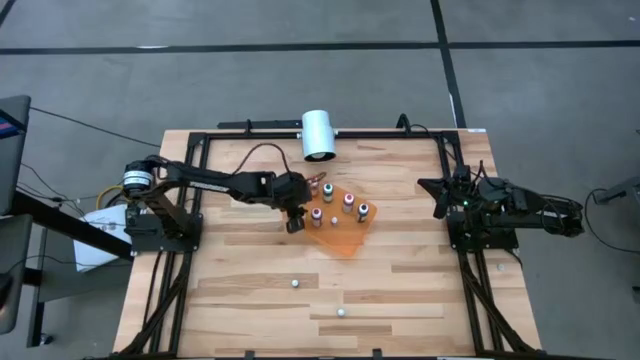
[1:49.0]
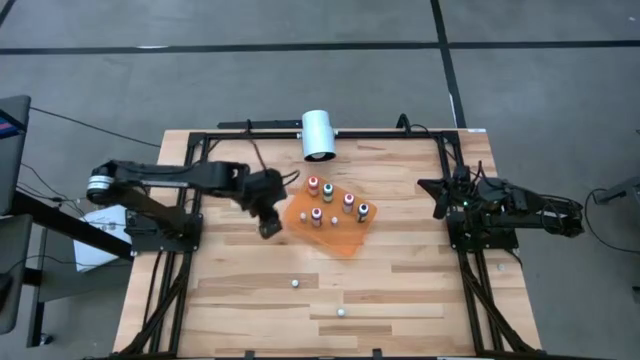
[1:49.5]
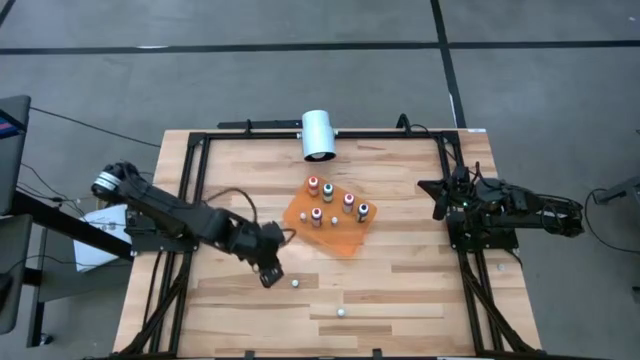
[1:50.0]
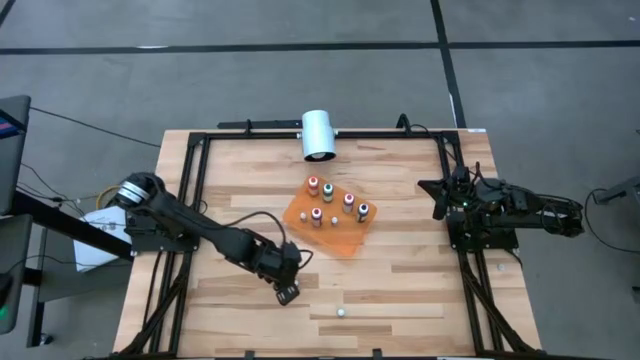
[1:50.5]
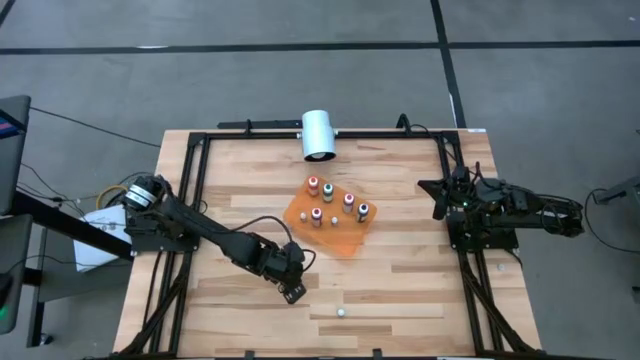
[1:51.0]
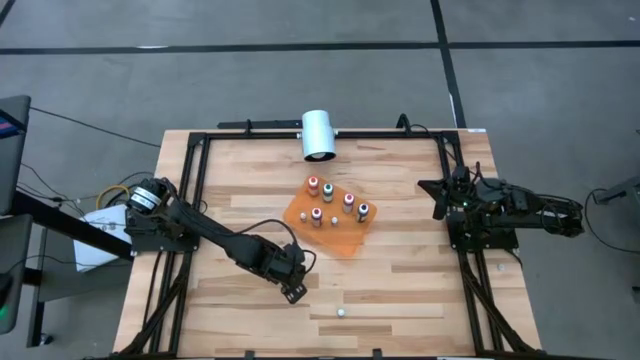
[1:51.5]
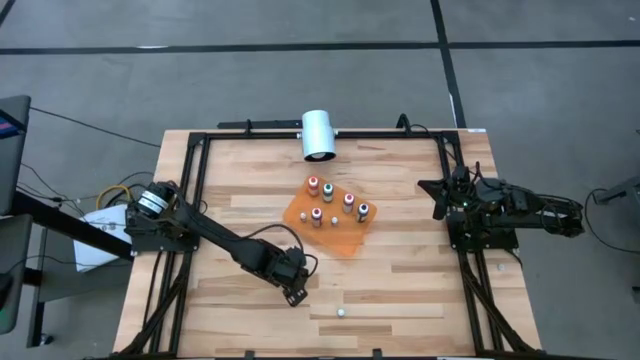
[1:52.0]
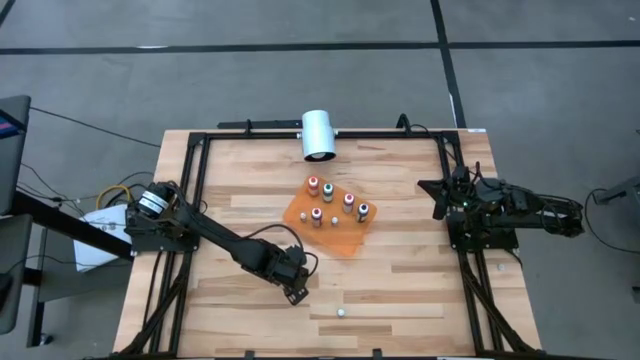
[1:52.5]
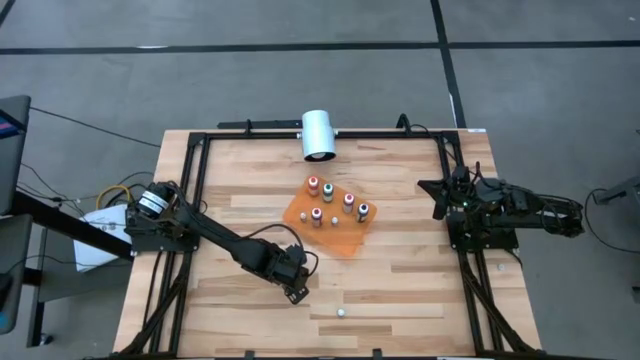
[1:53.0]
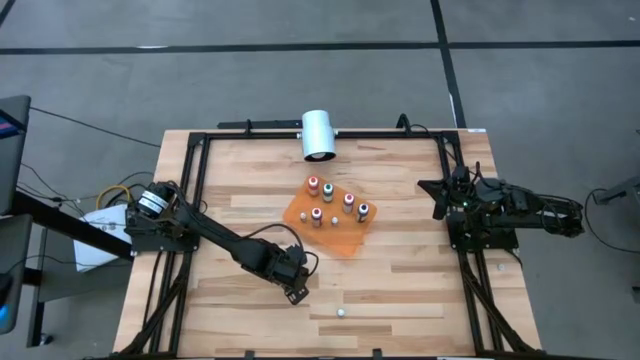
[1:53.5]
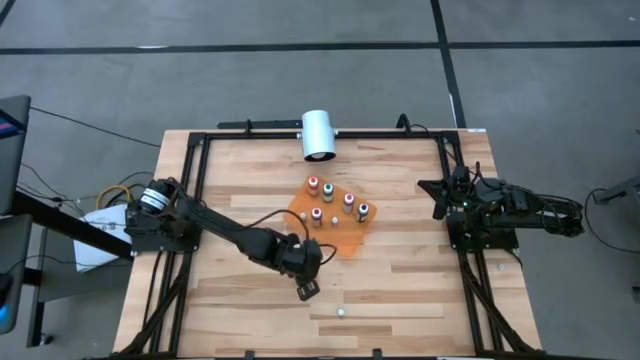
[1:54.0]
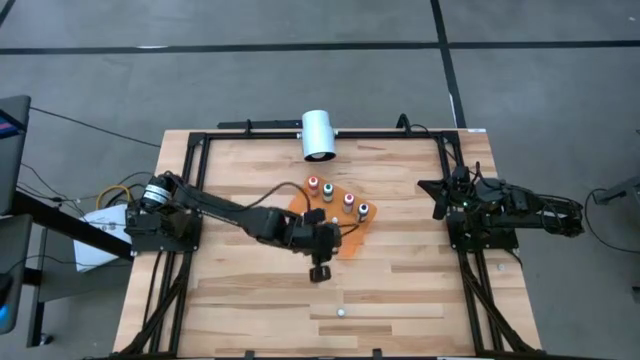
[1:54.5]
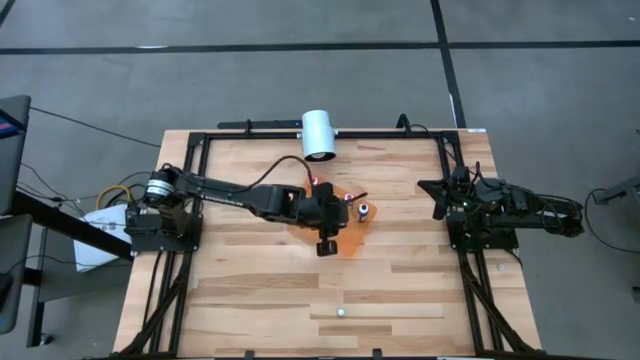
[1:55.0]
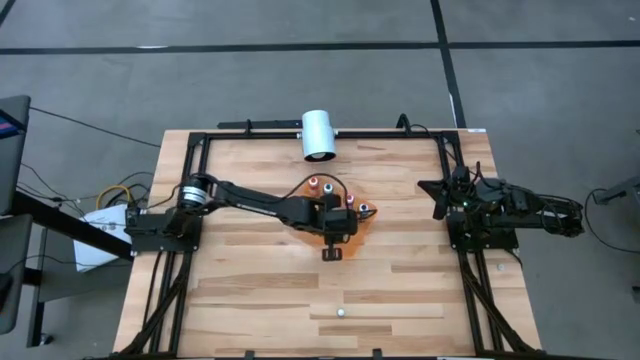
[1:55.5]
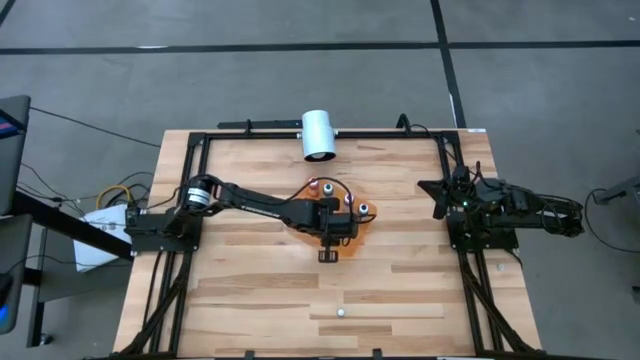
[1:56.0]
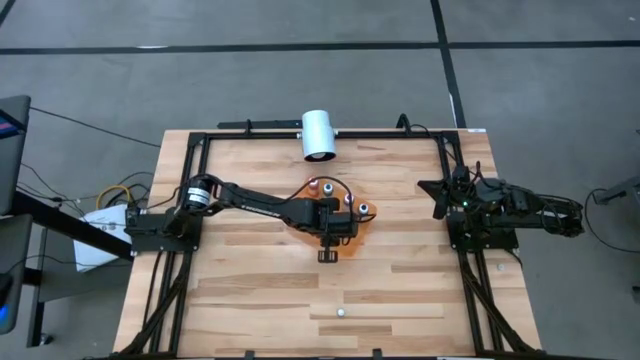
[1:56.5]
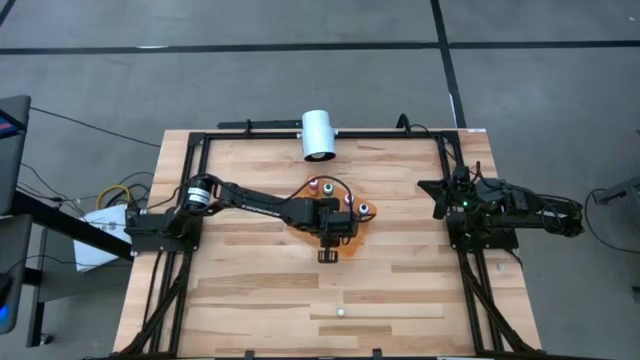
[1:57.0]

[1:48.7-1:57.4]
Task: Pick & Place food coloring
Put the small green food coloring bottle into the bin

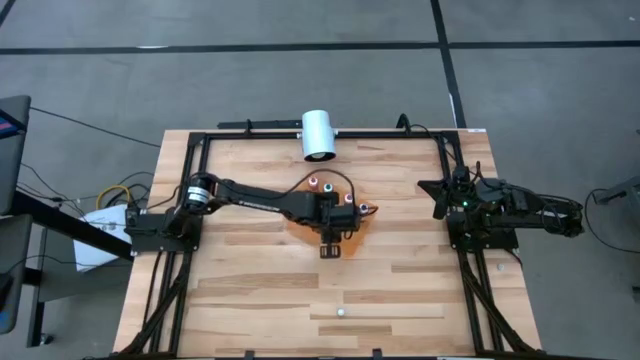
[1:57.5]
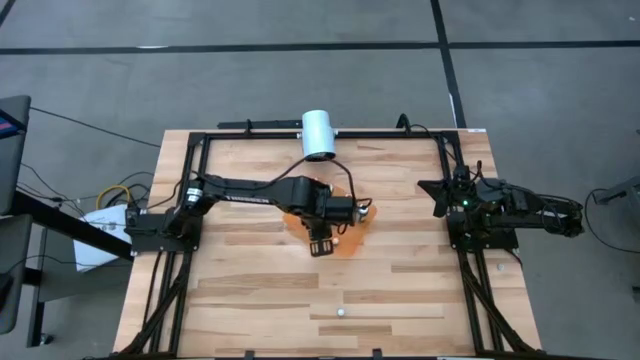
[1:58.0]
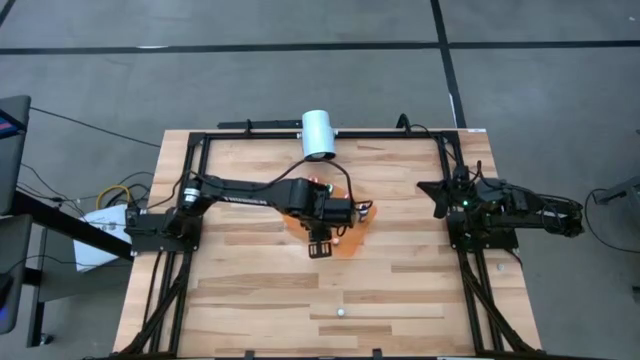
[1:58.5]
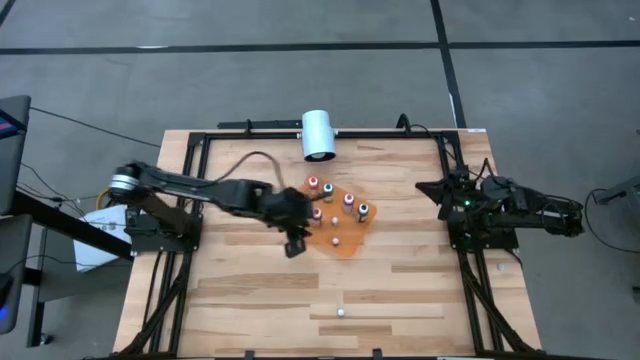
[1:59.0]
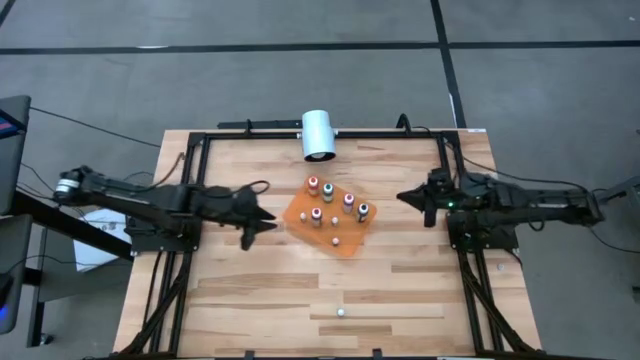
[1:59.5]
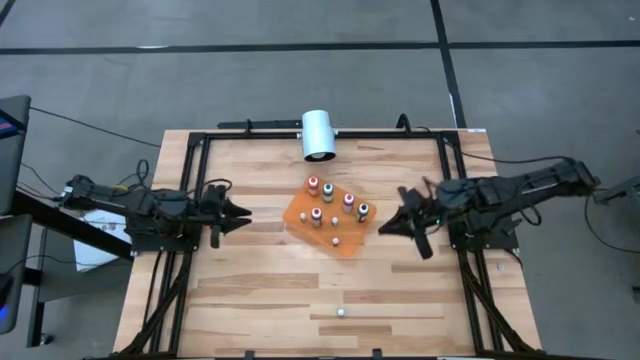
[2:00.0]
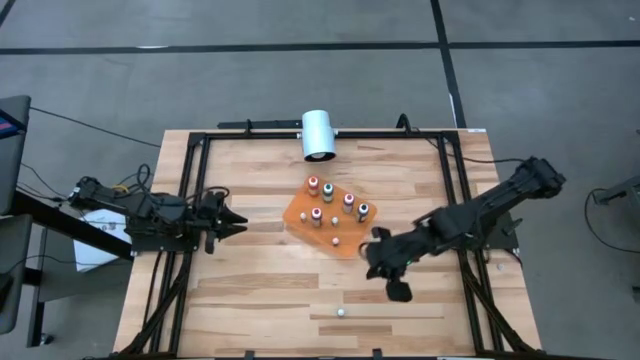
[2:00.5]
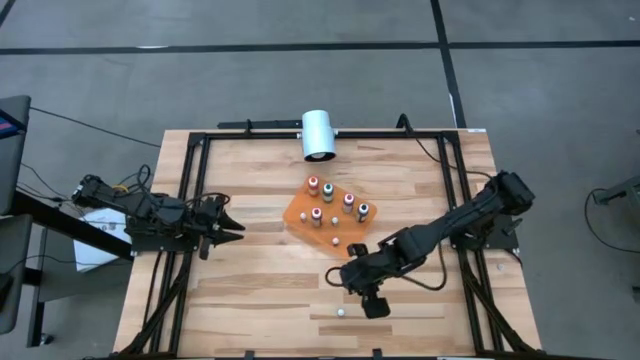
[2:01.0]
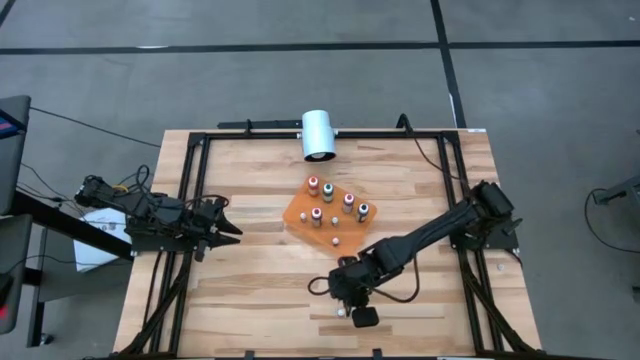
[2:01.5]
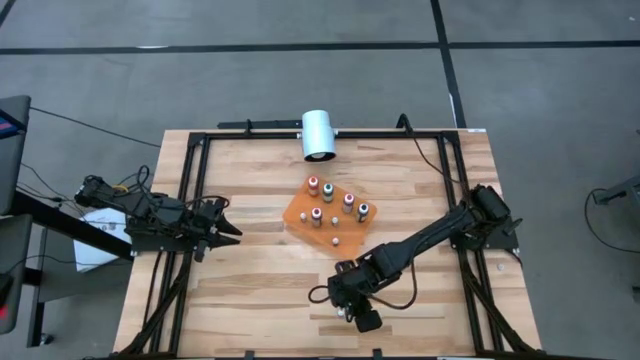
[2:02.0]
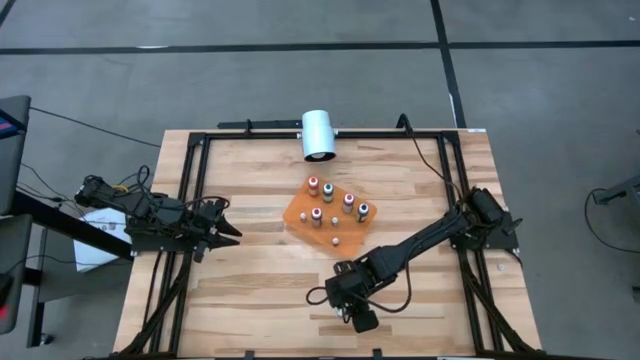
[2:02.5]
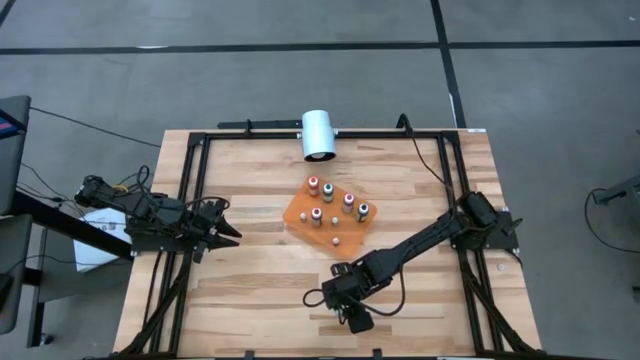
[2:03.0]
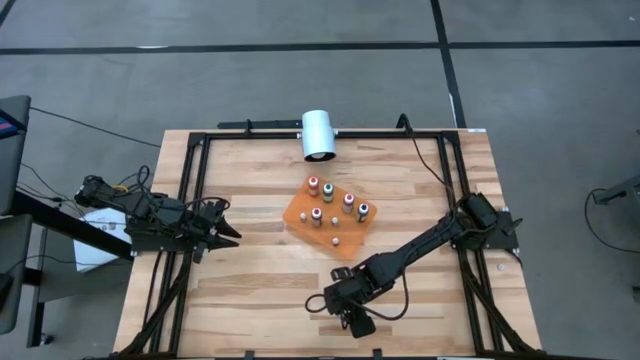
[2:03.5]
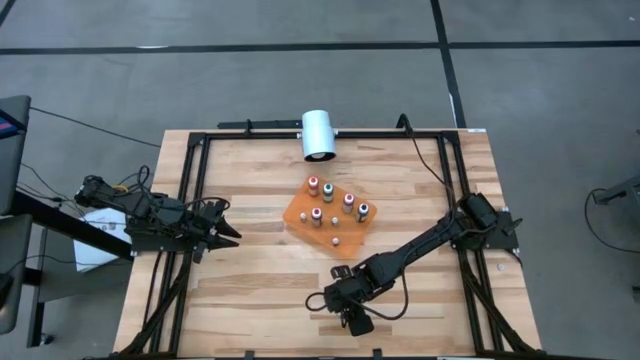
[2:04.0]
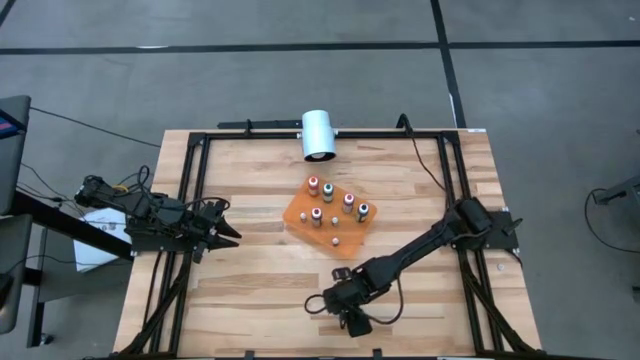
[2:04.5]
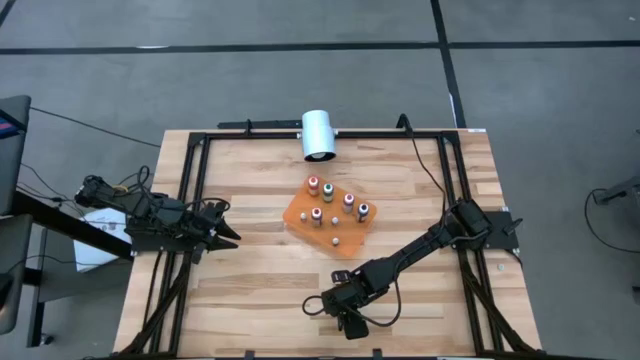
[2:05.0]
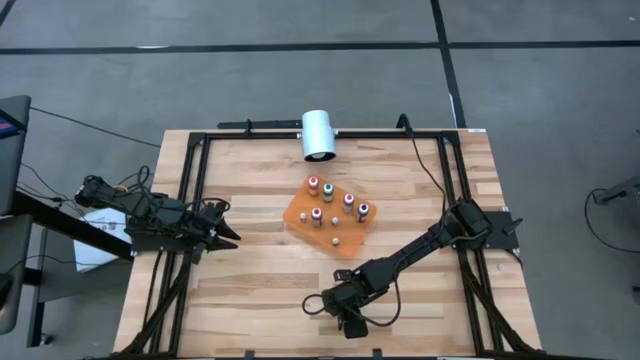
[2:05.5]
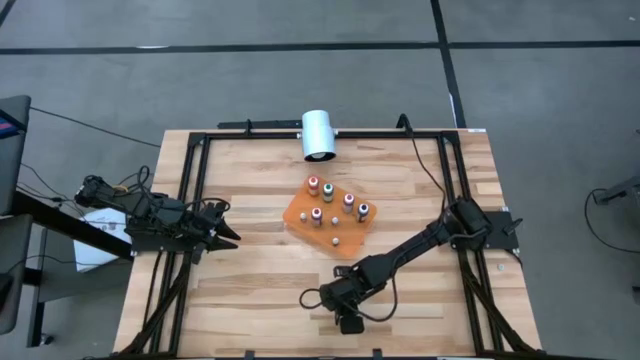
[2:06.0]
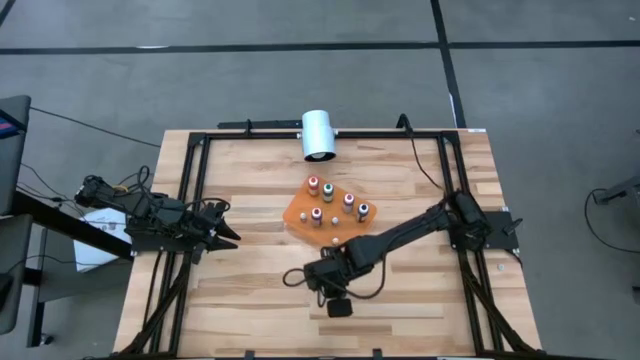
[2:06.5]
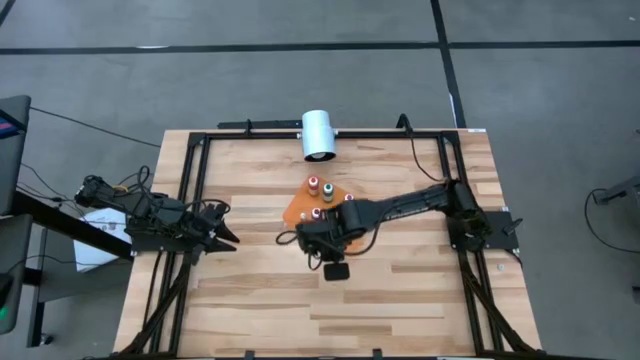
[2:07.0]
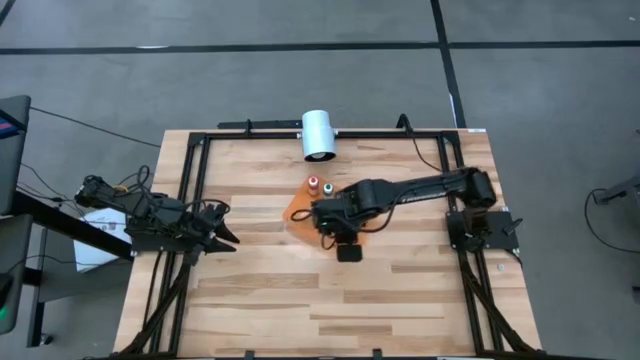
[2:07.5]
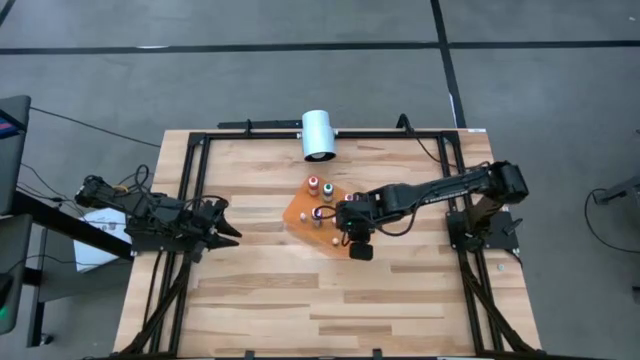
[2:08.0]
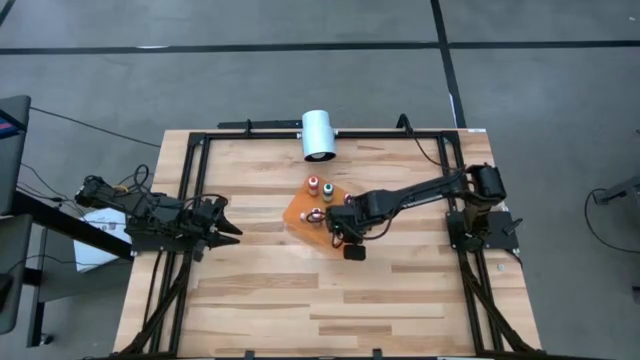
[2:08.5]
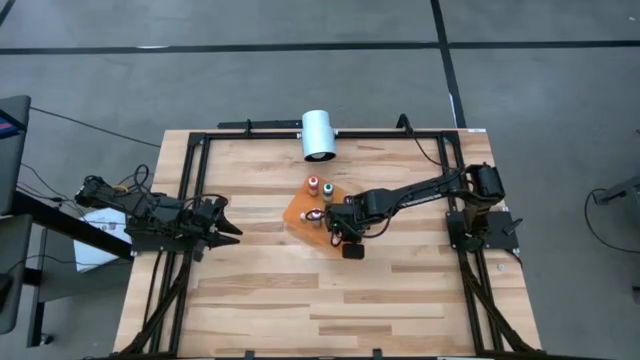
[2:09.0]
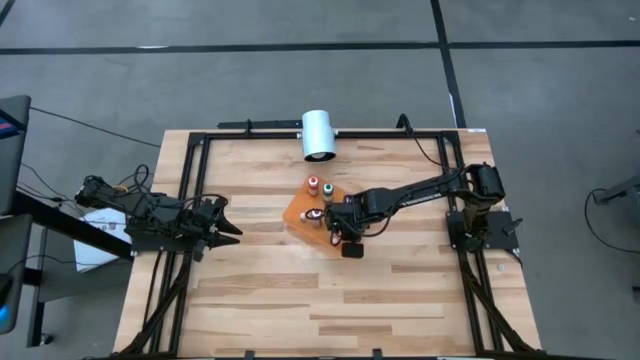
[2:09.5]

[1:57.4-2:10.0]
Put the small black food coloring bottle into the bin

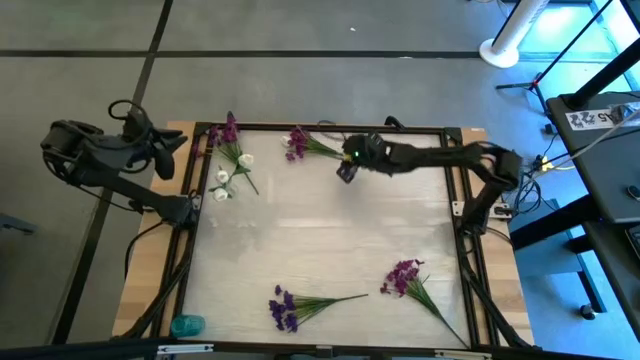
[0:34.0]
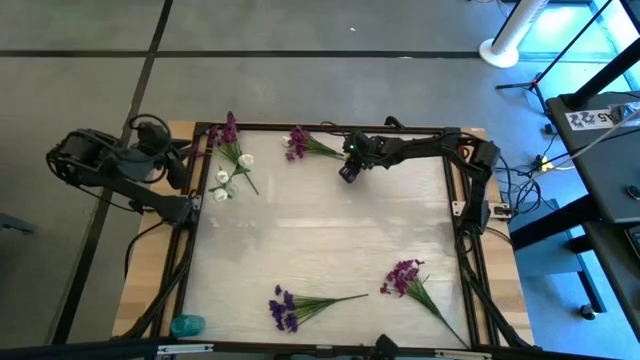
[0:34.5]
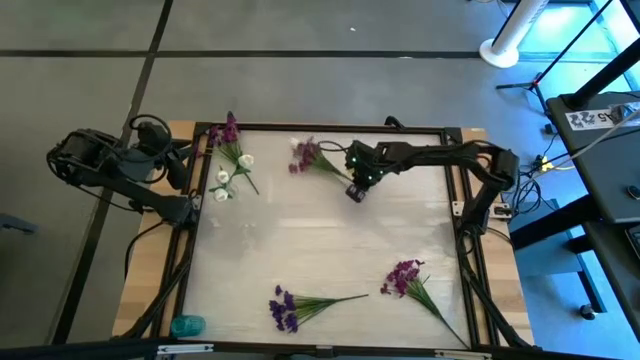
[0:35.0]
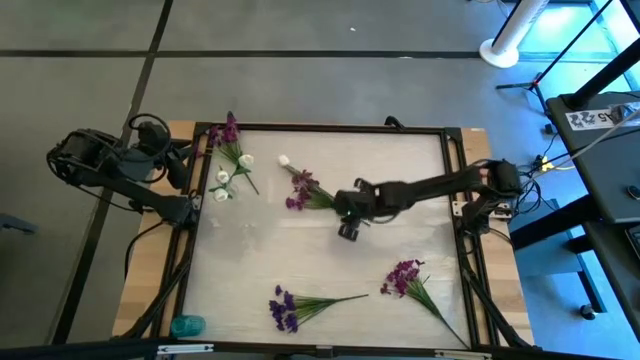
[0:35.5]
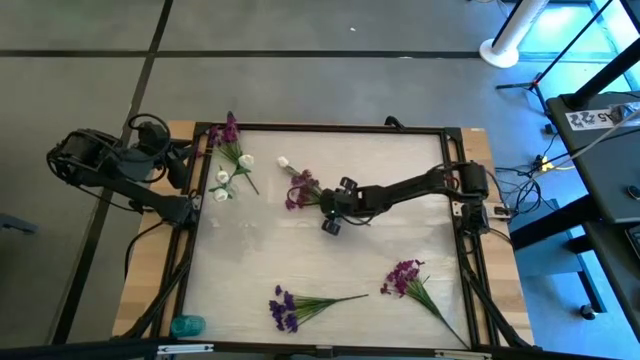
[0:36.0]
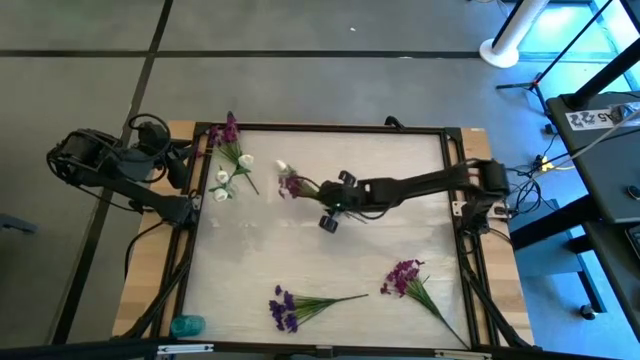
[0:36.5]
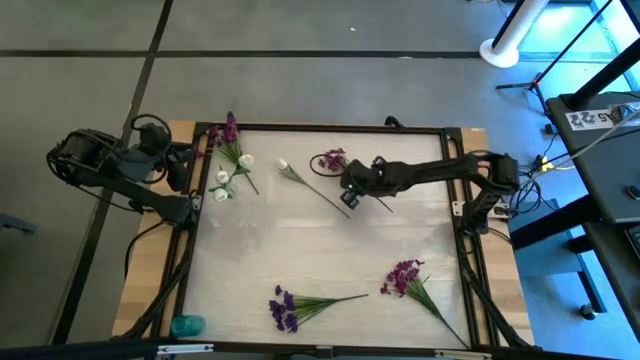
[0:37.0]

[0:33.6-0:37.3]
Task: Sort flowers into vase by color
Move the the violet flowers to the right center of the table
